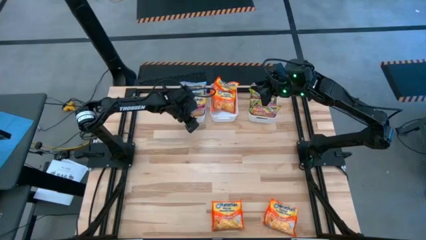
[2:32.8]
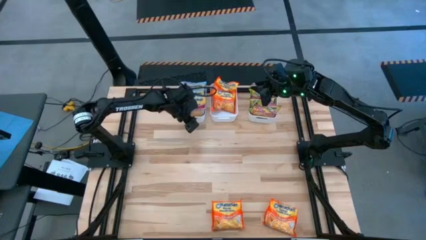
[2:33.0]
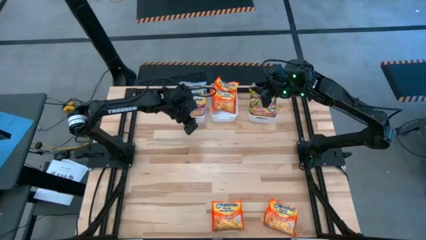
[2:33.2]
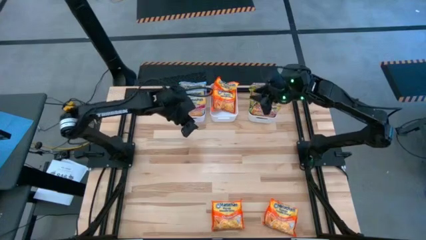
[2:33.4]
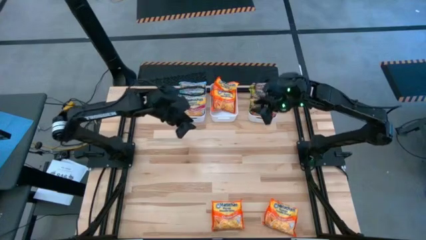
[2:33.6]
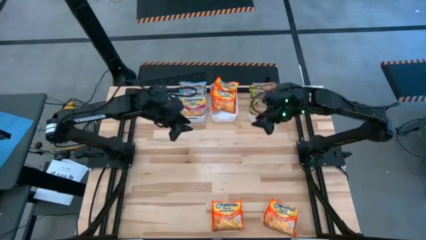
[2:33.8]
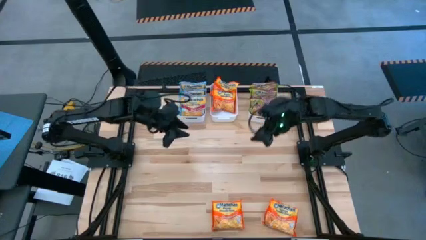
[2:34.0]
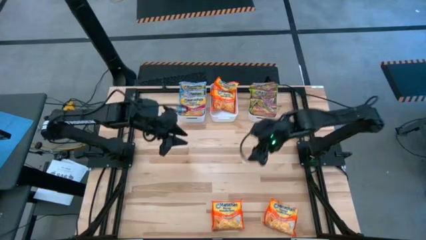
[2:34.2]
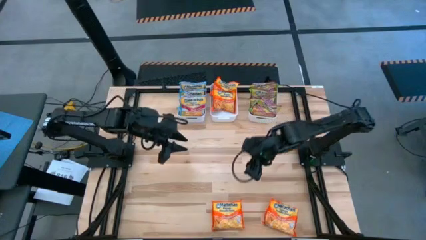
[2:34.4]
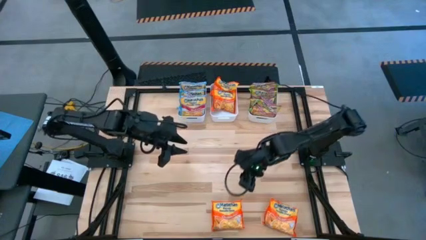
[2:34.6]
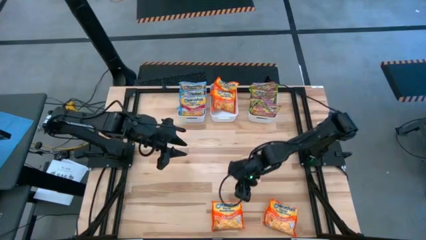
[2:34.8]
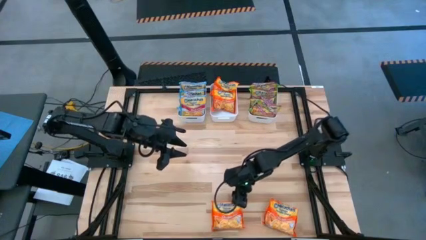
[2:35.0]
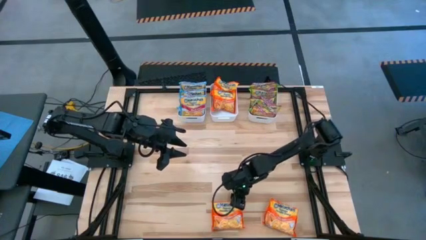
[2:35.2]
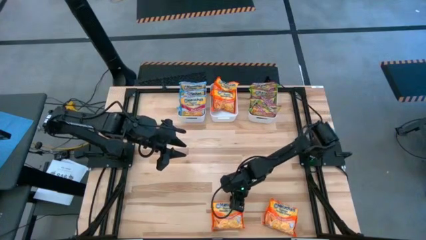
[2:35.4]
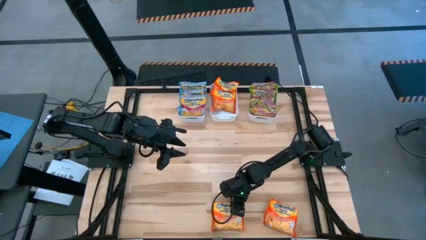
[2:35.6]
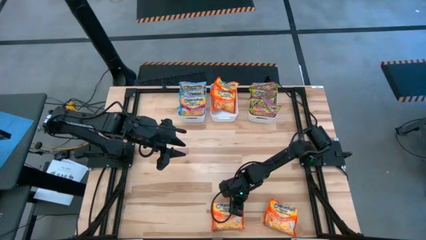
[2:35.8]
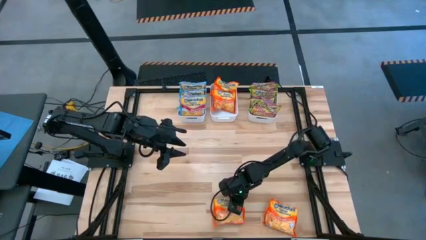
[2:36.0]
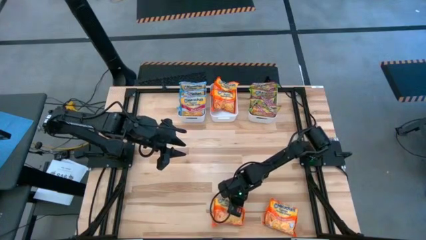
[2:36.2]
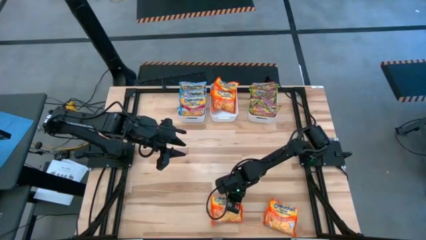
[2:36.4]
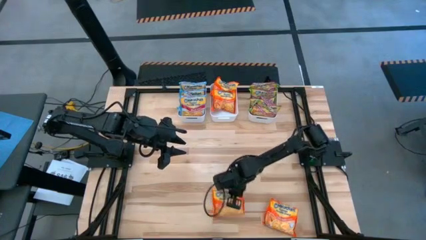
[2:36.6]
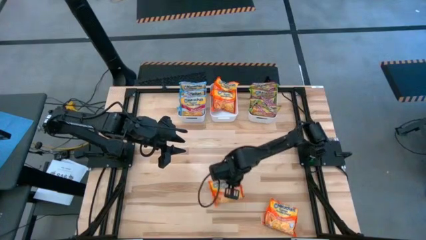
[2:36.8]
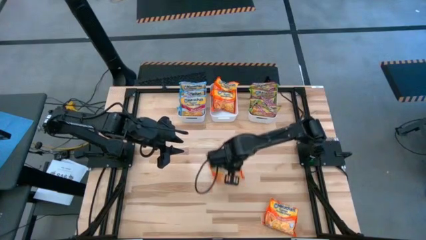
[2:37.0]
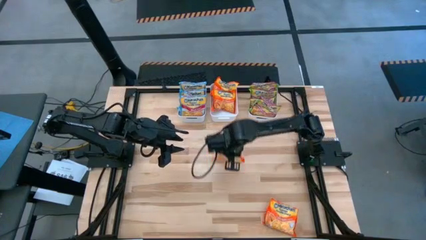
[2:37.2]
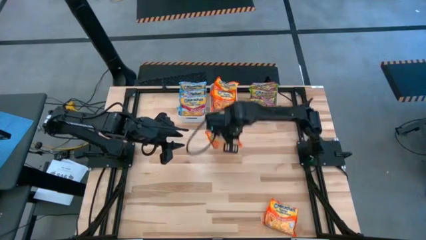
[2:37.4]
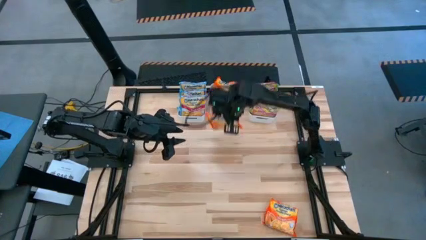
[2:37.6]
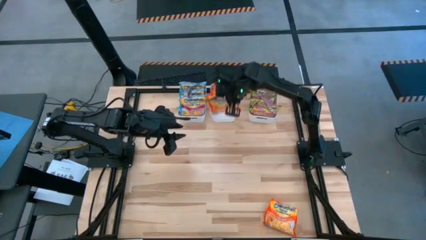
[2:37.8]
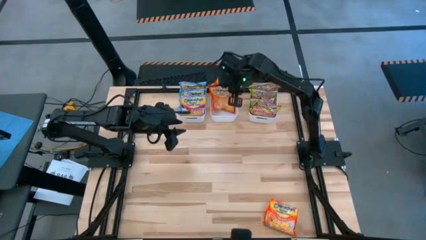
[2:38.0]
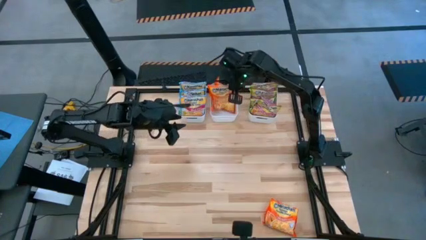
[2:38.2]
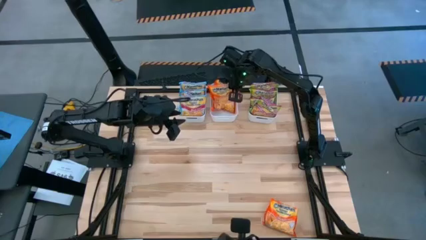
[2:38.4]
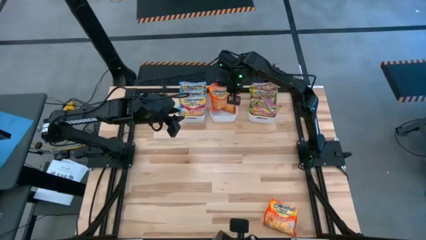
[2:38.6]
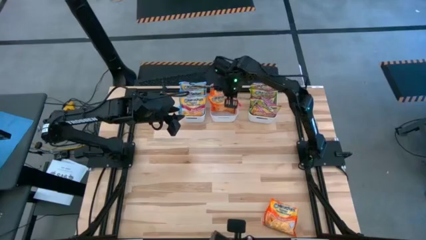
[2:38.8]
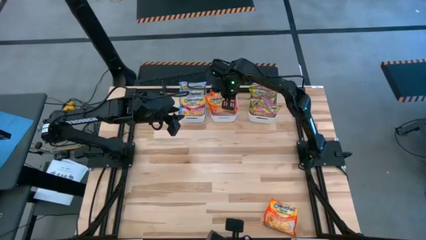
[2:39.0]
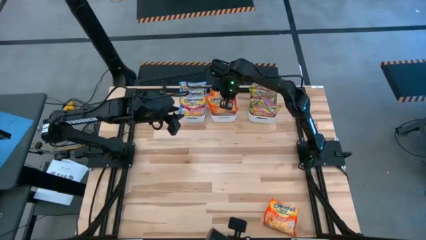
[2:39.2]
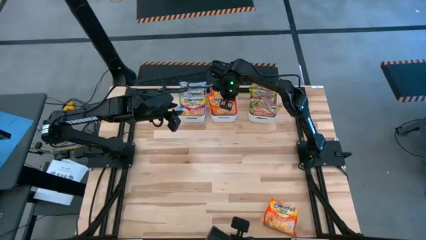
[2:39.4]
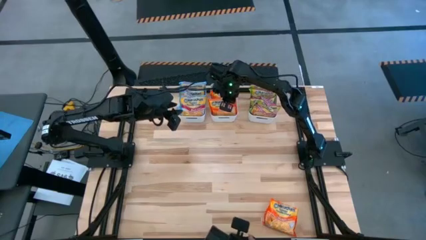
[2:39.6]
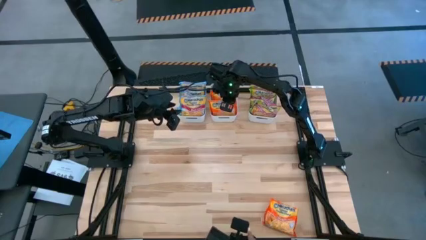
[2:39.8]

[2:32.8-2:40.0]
Task: Sort Maruchan noodles
Put the orange noodle pack into the middle white bin

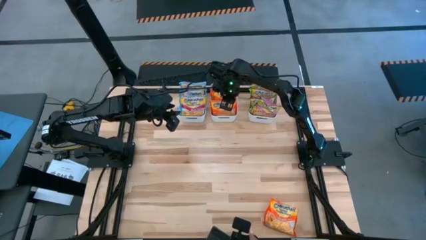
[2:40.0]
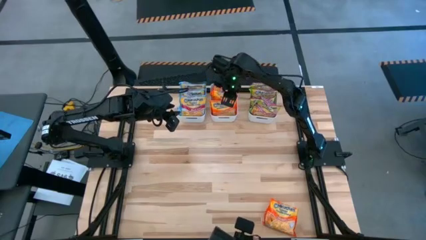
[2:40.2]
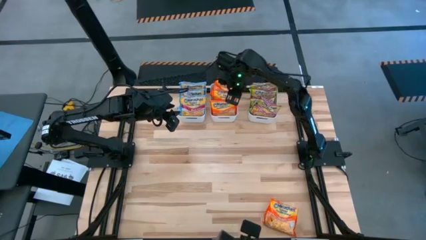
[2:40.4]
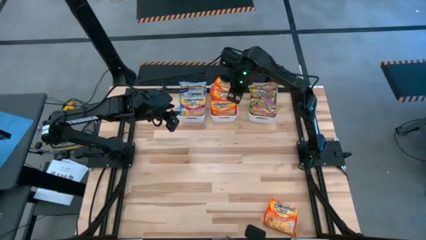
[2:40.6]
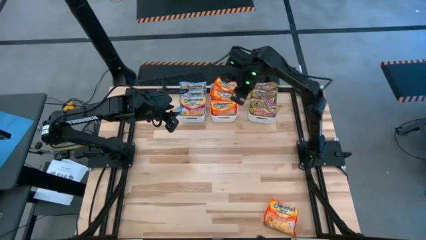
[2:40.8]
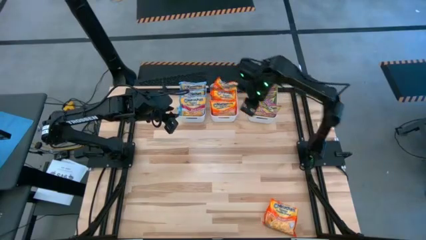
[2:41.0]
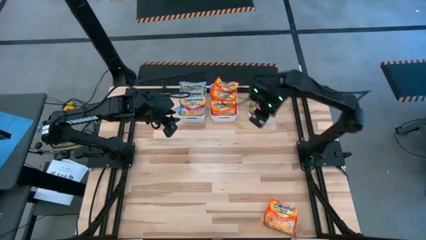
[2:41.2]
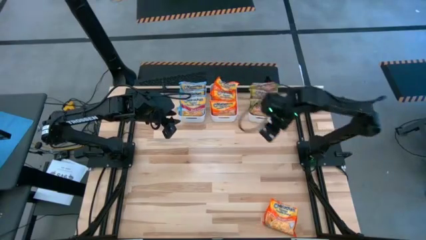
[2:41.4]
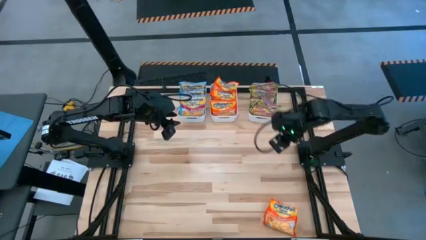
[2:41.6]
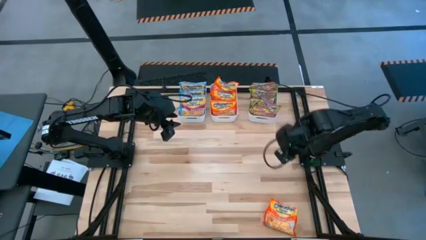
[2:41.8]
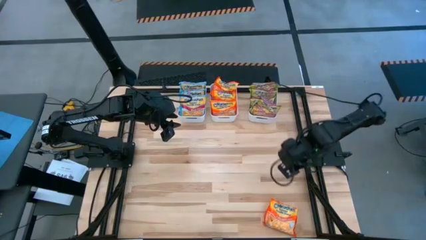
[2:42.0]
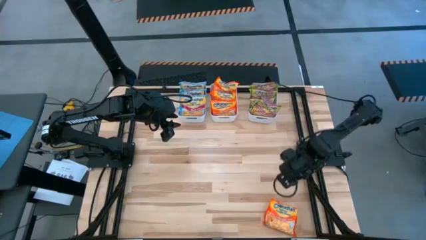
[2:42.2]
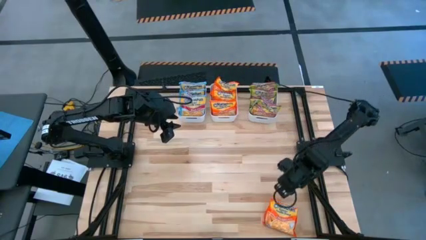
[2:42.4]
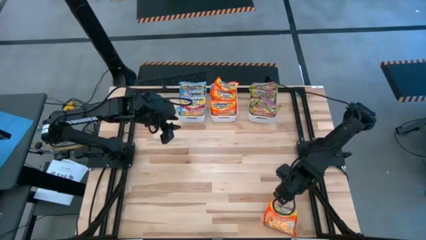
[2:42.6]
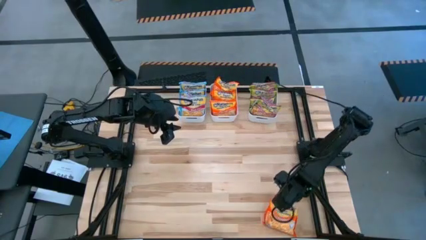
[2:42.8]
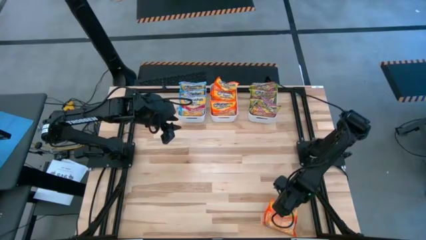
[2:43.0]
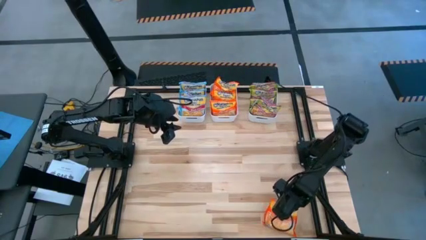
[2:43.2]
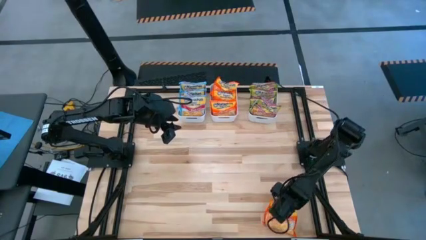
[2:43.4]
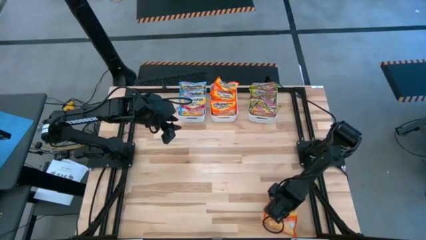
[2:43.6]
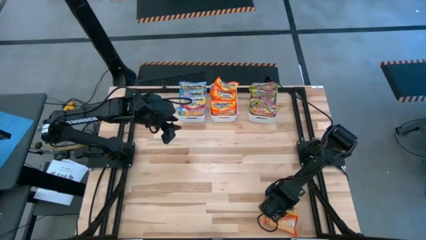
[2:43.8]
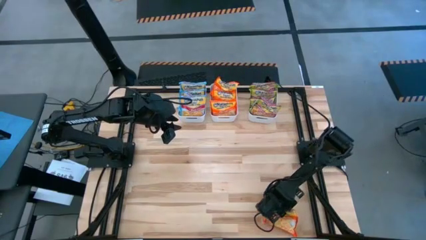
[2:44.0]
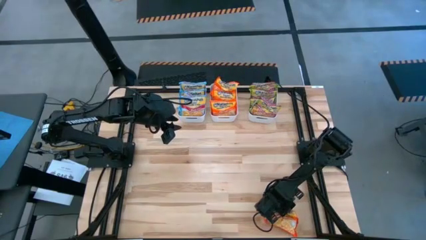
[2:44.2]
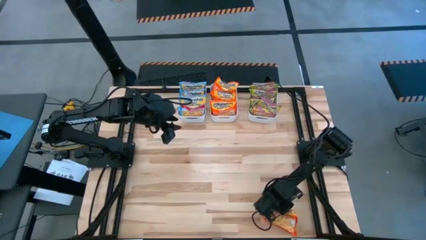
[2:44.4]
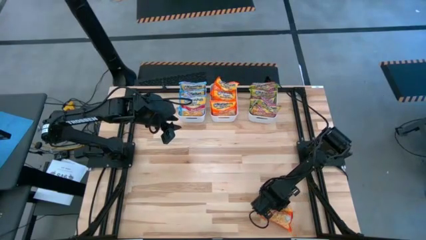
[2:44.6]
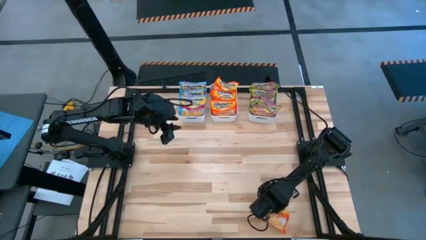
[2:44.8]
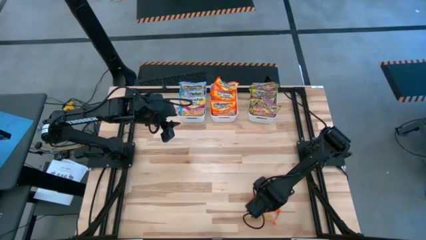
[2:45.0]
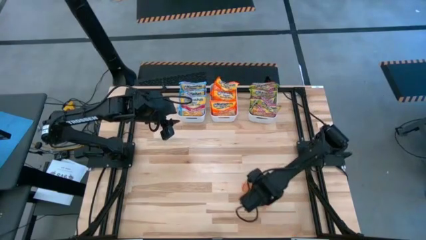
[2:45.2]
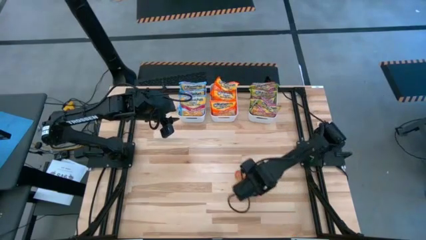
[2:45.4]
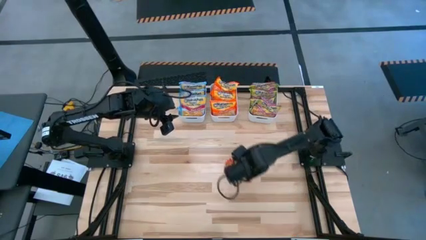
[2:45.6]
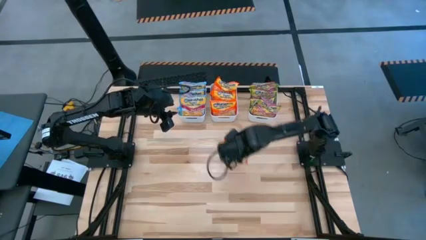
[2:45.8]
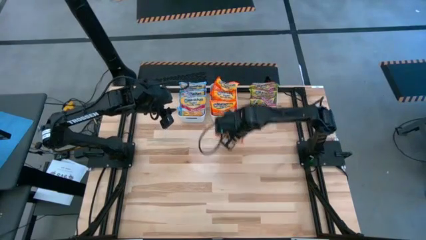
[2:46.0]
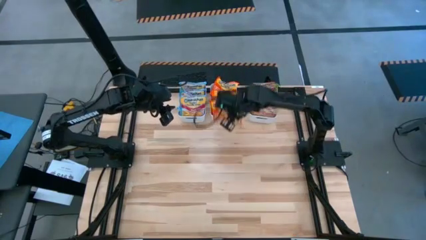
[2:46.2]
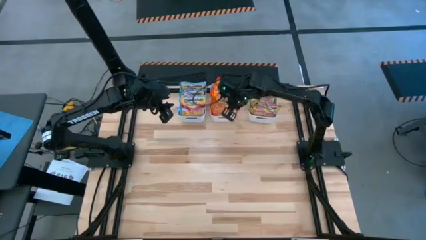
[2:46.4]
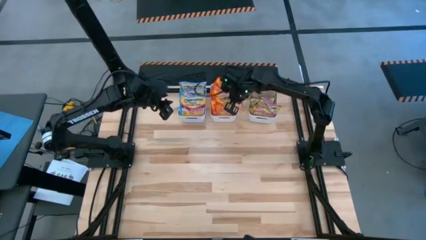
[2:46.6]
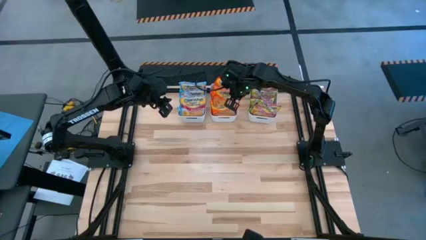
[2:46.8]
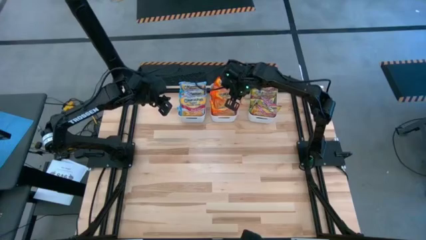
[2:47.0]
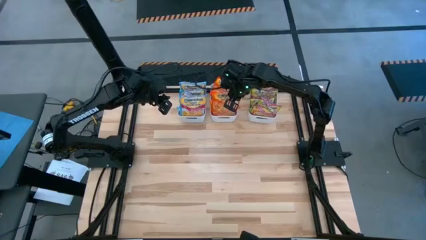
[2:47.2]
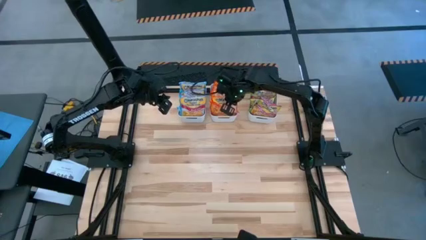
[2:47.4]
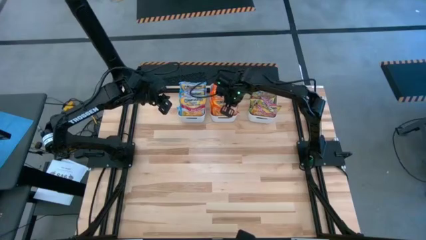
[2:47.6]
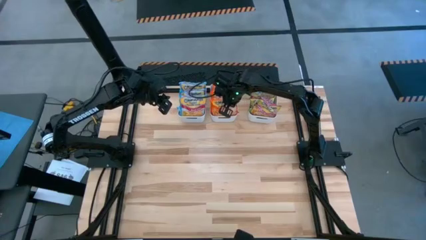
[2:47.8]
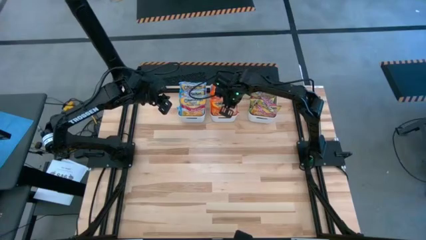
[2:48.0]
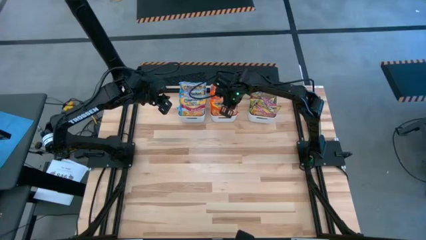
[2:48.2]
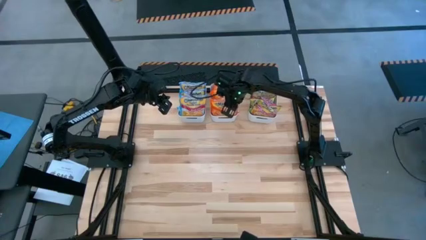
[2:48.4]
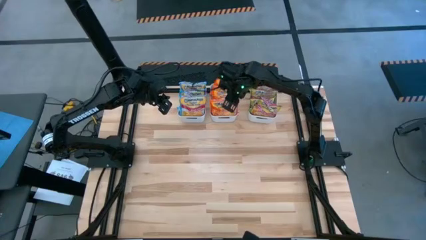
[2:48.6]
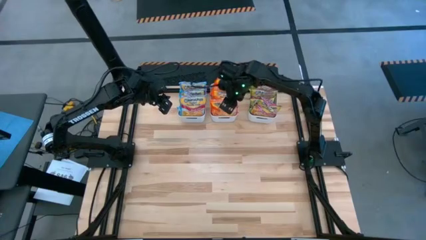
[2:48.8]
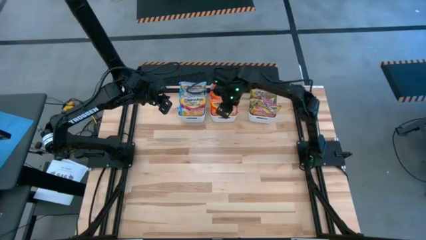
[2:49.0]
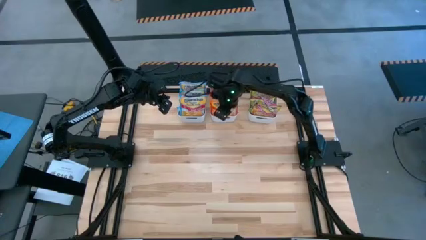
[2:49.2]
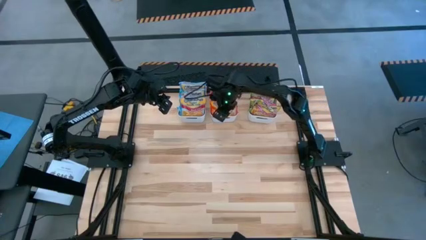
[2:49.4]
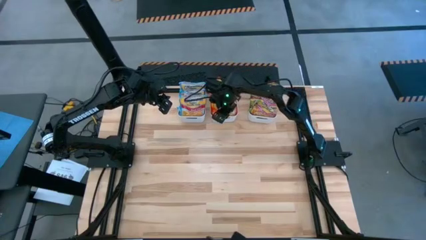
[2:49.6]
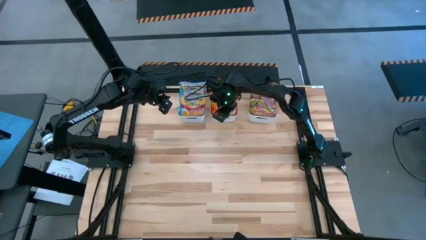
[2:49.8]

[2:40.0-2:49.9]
Put the orange noodle pack into the middle white bin
